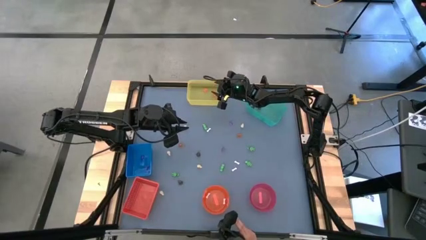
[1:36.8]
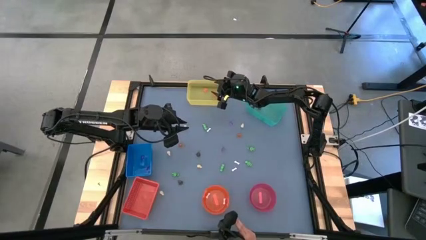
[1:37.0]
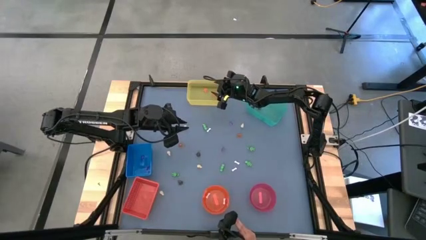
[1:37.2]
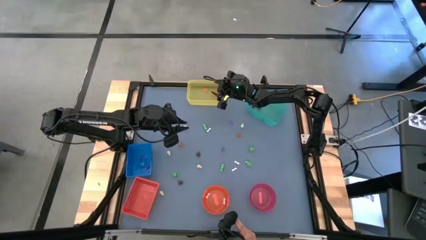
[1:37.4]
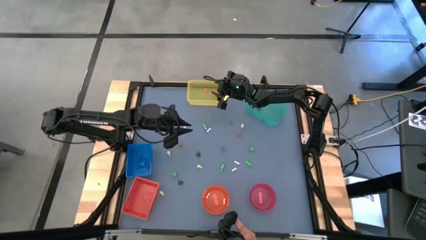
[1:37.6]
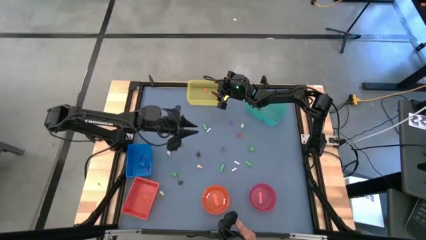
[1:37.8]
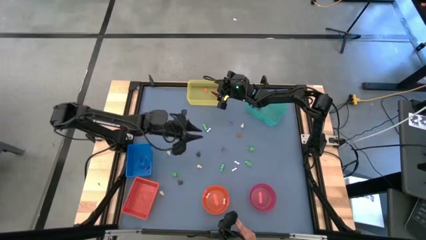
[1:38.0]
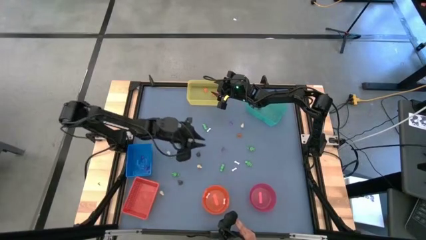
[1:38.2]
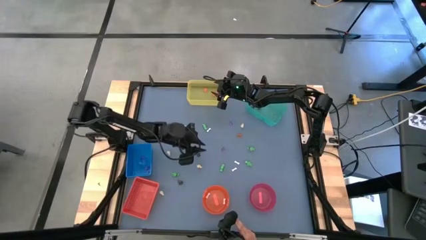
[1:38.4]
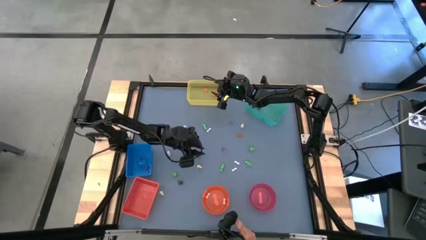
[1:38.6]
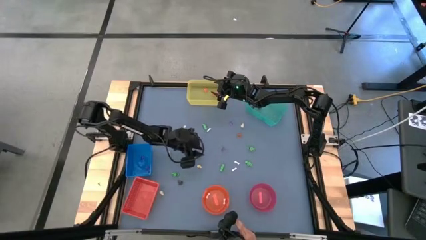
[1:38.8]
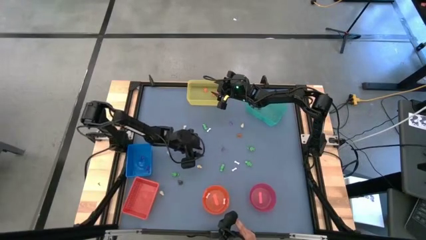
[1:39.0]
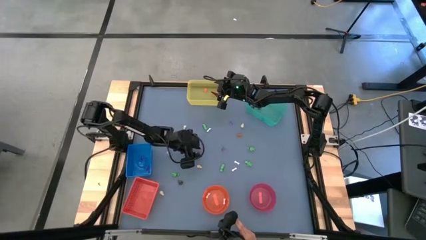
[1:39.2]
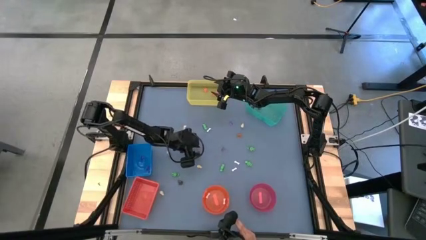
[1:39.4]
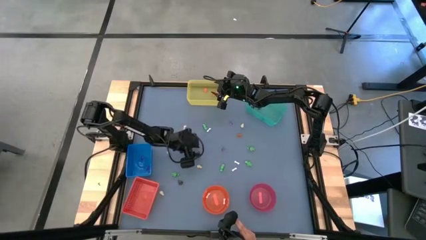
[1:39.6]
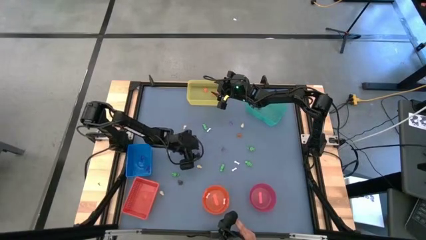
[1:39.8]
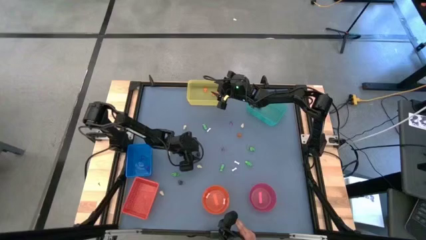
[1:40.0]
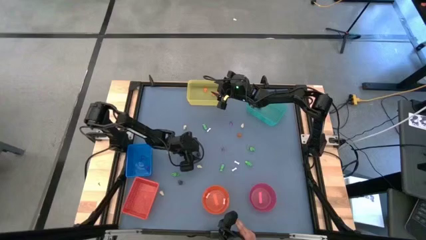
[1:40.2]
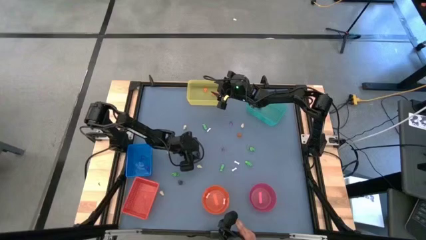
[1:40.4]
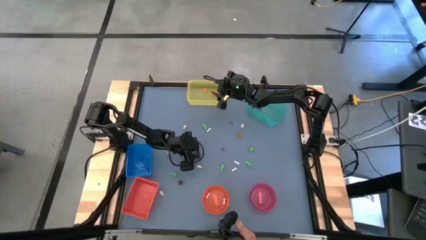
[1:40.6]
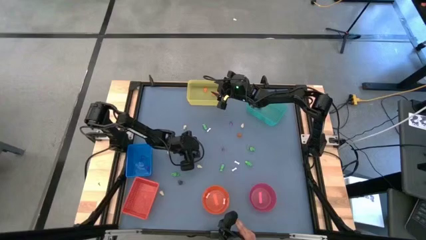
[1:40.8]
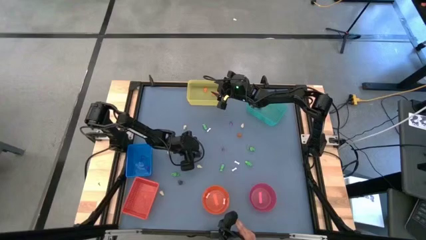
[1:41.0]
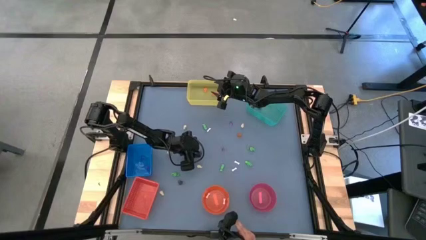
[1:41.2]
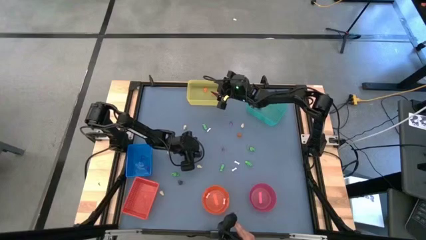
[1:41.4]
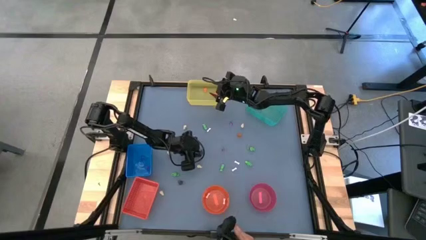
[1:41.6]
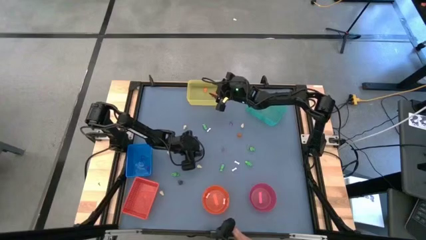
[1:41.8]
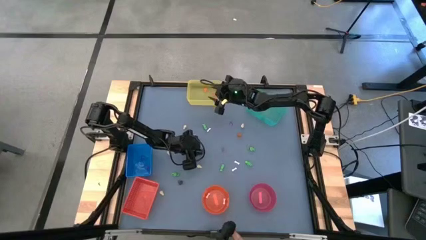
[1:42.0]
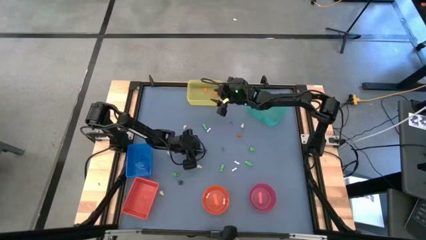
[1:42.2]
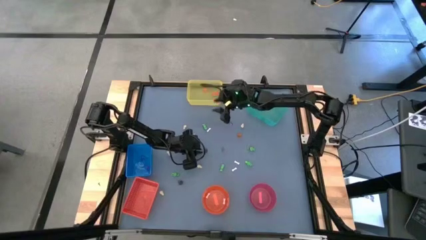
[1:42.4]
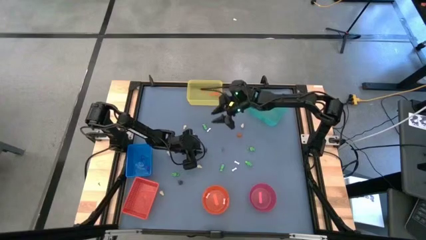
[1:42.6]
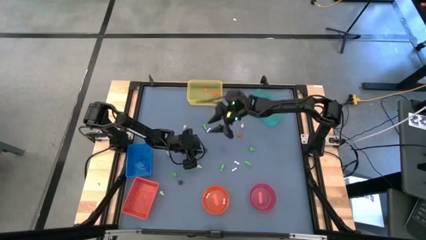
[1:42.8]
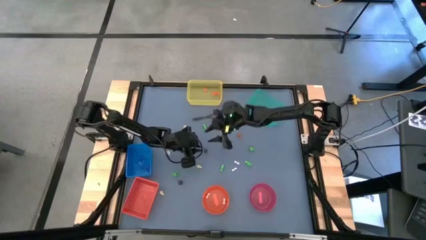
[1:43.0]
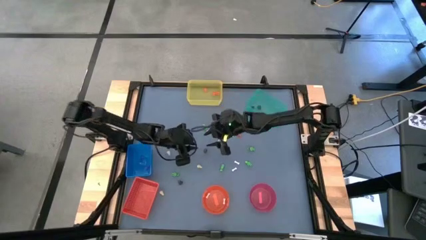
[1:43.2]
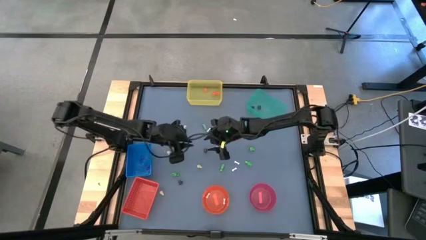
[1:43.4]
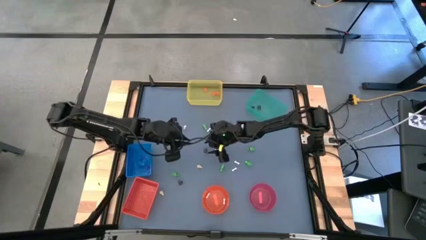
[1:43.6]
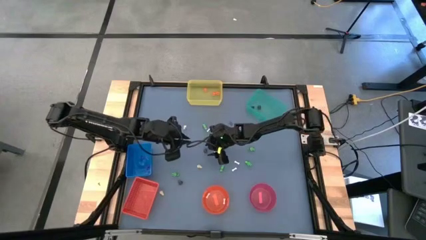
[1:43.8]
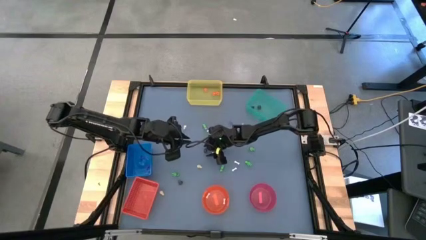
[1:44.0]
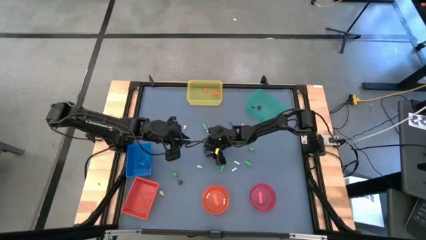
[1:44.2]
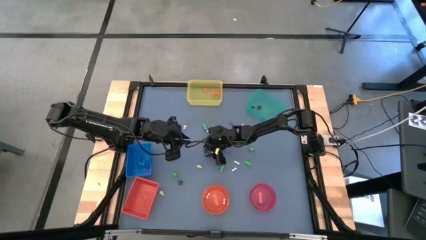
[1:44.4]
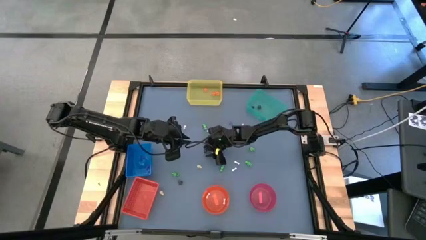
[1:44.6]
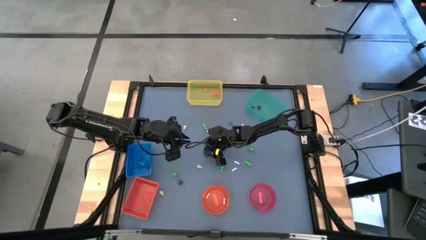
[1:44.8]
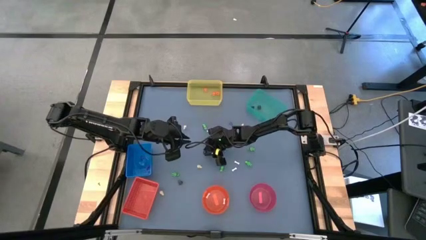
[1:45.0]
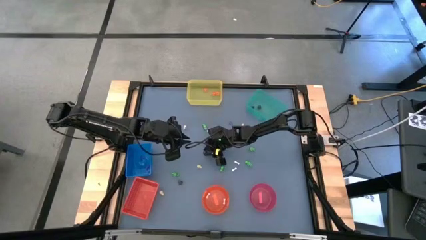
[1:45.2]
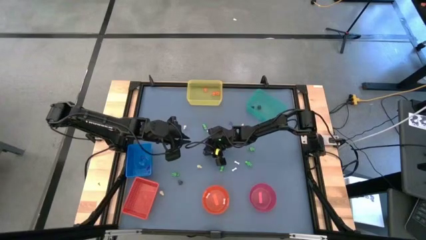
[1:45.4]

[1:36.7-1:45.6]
Task: Sort Halloween decoration
Put the black skull toy into the light blue bin

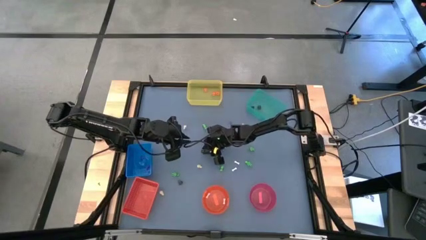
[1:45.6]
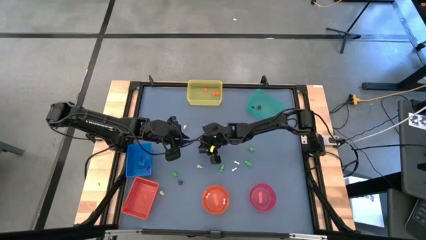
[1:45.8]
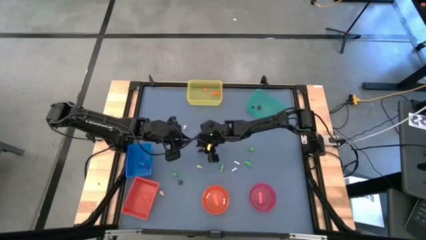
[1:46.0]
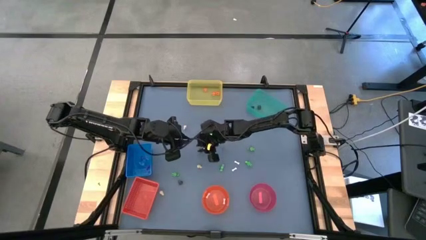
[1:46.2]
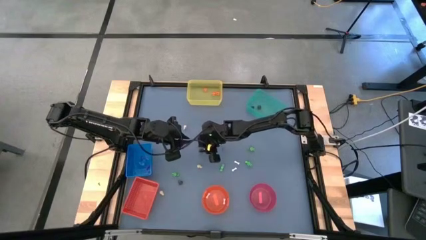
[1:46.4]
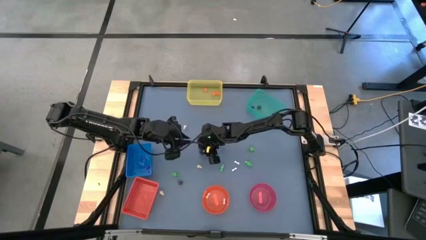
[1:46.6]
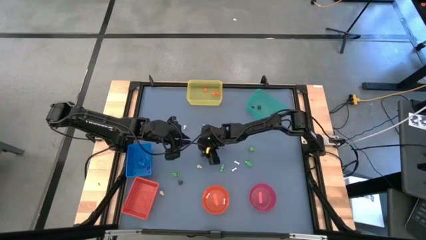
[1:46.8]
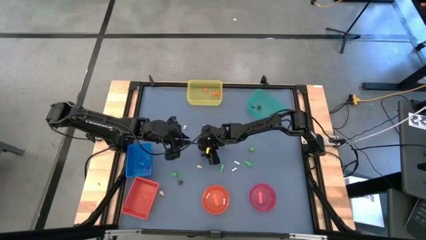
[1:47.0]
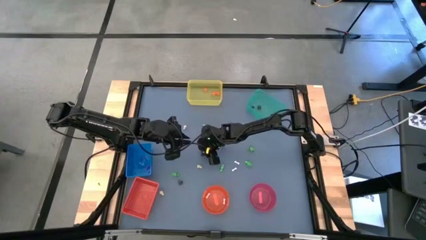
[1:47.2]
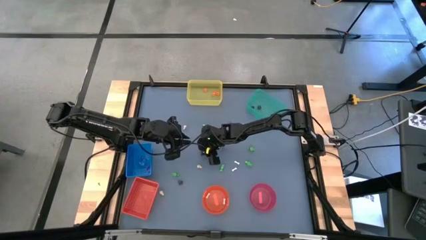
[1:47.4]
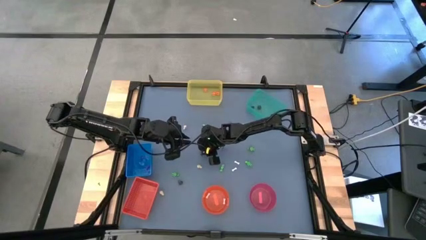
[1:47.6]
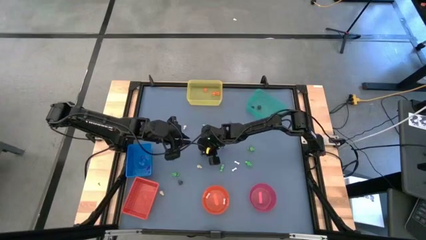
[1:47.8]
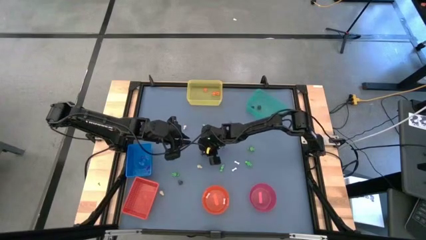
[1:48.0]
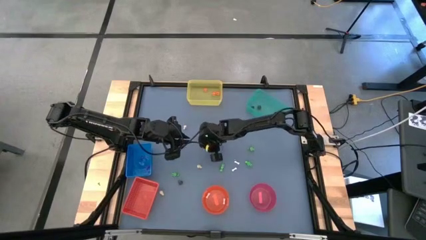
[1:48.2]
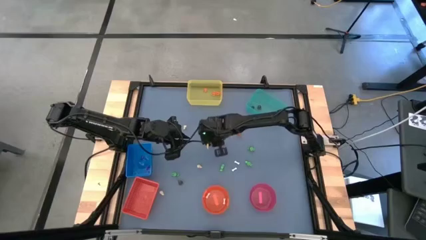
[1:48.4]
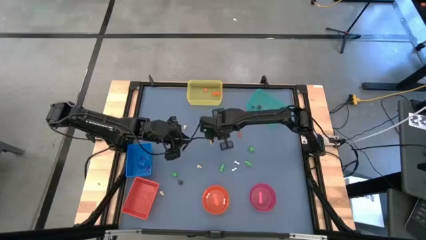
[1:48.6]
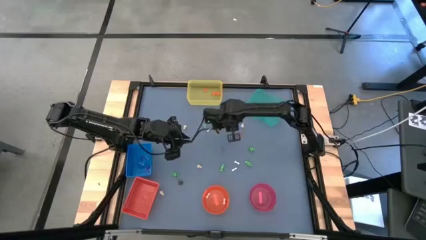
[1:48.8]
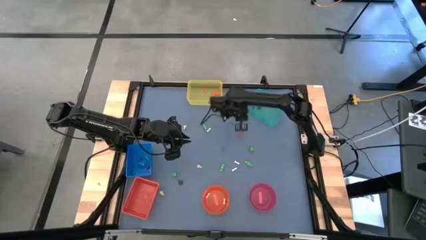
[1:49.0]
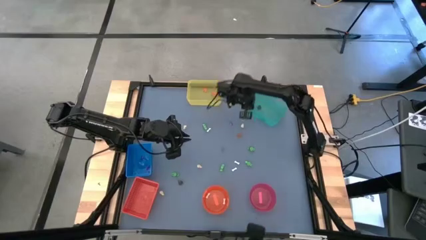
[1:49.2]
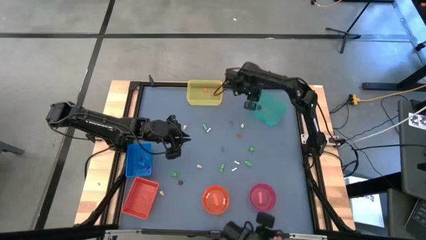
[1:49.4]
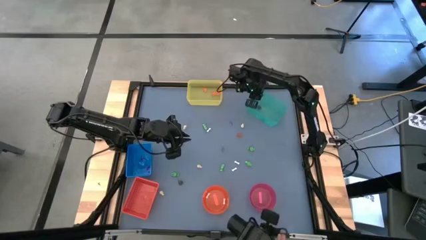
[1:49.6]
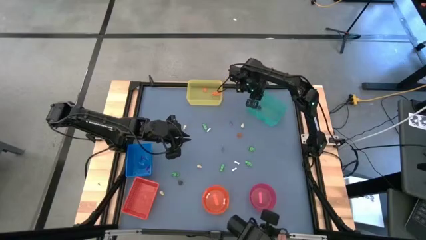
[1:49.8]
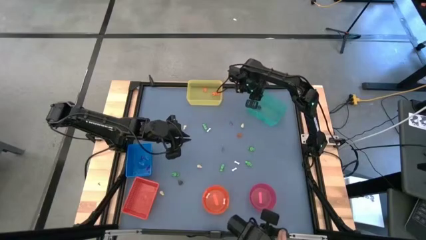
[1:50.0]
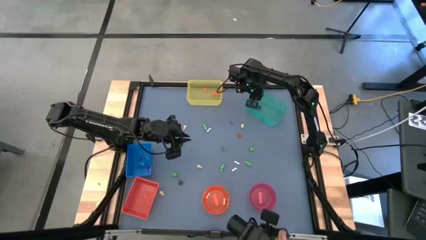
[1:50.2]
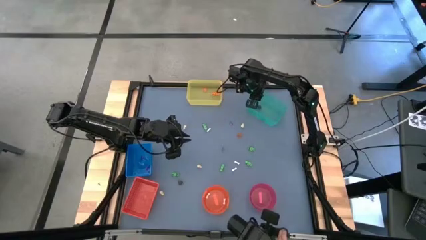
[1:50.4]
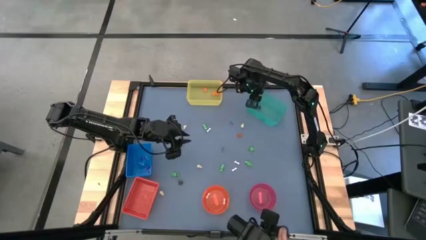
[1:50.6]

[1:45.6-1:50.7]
Put the black skull toy into the light blue bin
